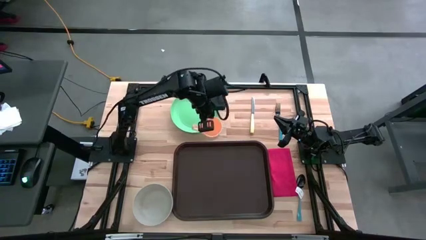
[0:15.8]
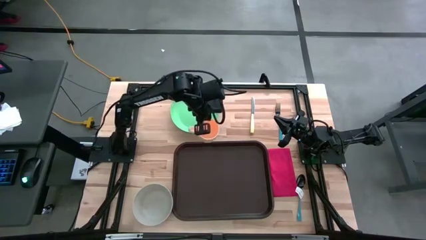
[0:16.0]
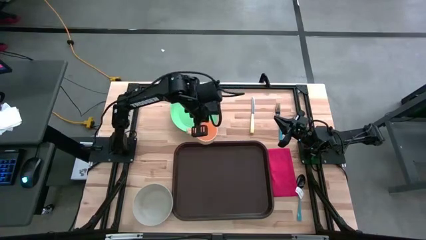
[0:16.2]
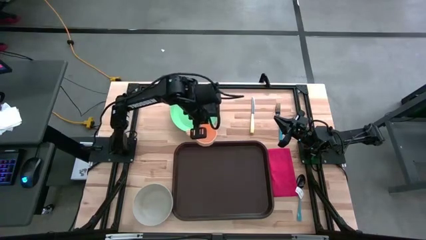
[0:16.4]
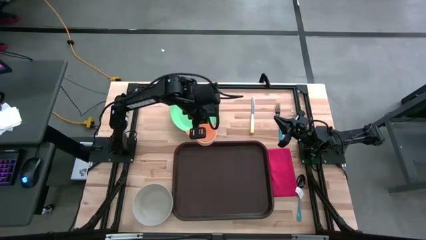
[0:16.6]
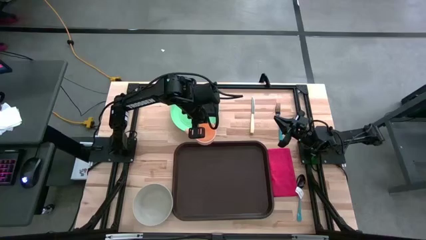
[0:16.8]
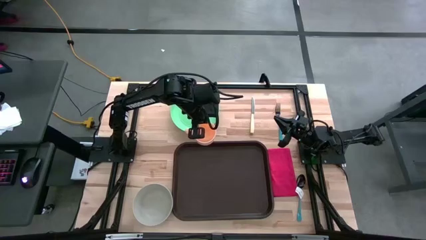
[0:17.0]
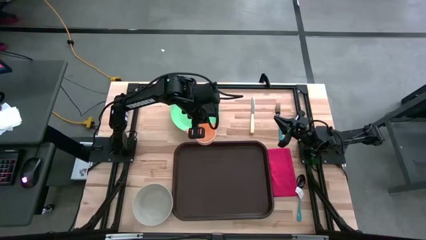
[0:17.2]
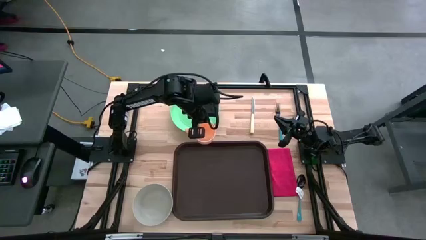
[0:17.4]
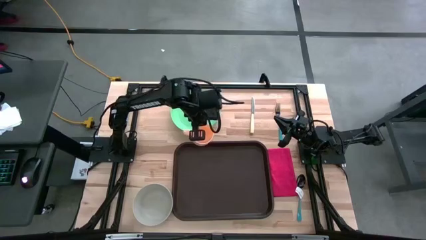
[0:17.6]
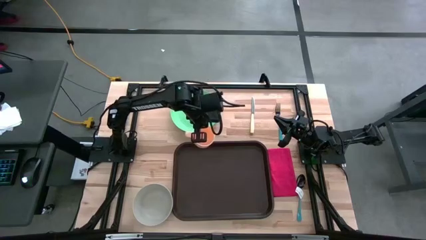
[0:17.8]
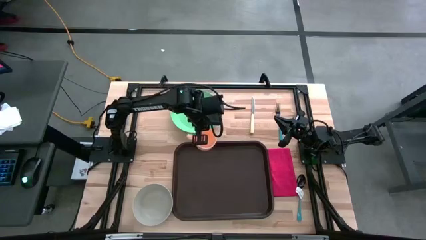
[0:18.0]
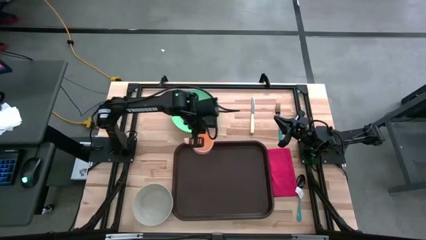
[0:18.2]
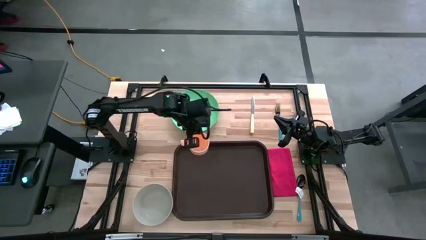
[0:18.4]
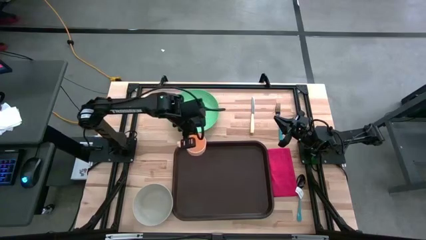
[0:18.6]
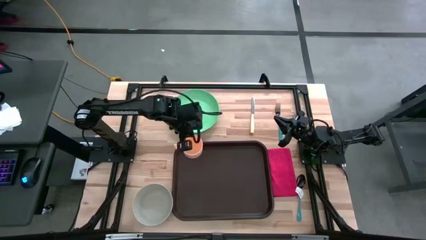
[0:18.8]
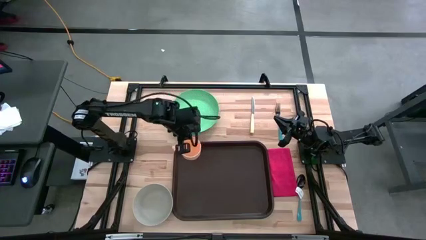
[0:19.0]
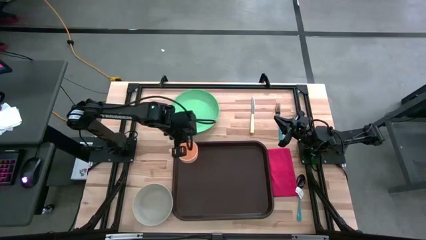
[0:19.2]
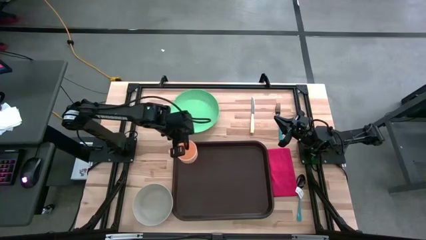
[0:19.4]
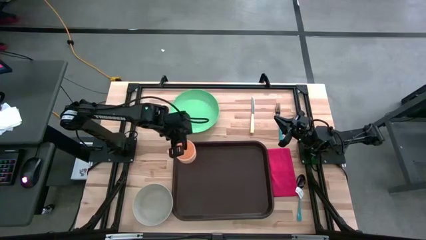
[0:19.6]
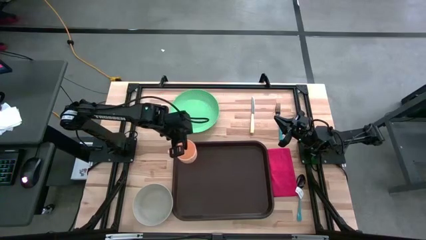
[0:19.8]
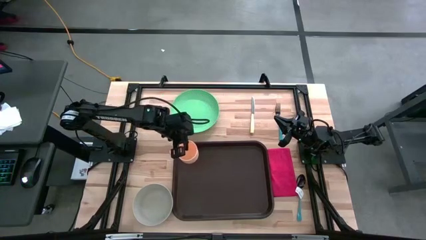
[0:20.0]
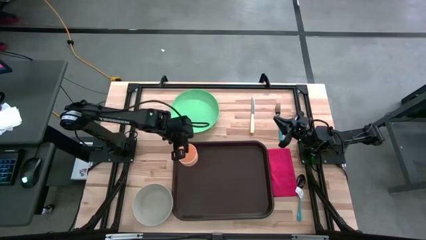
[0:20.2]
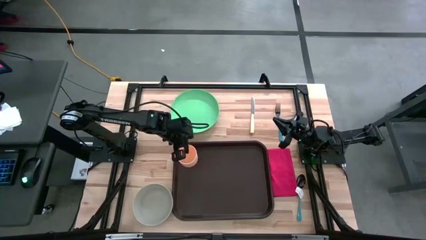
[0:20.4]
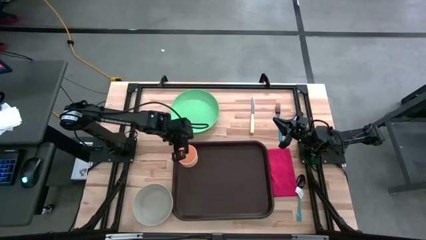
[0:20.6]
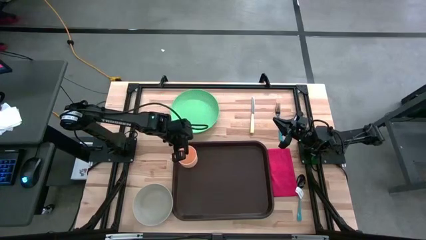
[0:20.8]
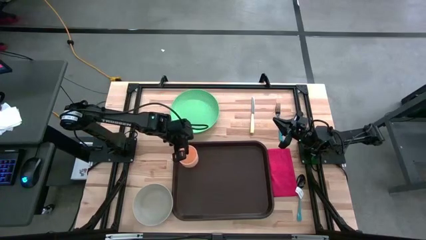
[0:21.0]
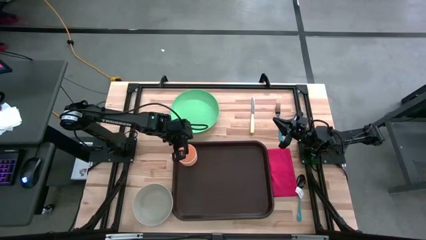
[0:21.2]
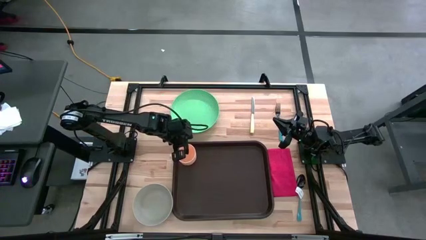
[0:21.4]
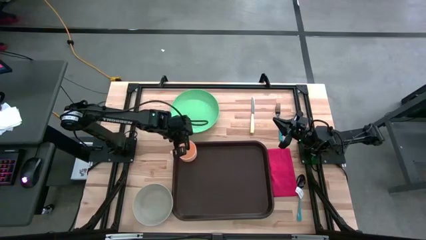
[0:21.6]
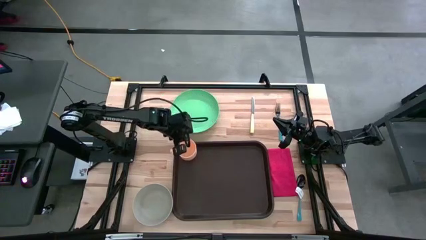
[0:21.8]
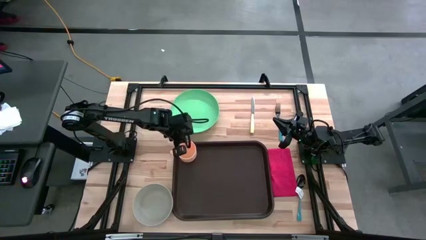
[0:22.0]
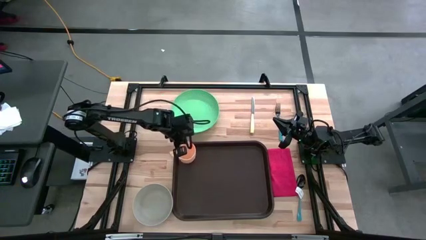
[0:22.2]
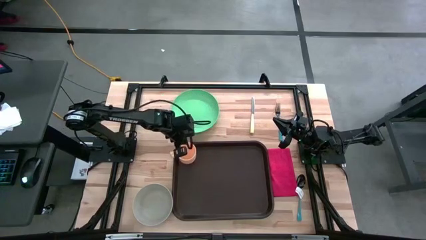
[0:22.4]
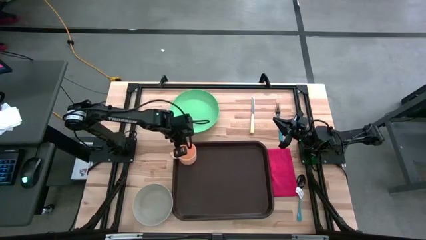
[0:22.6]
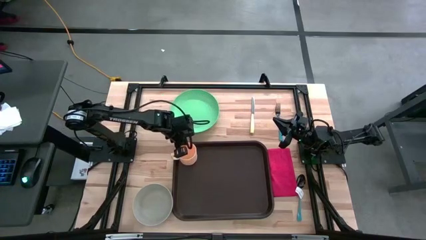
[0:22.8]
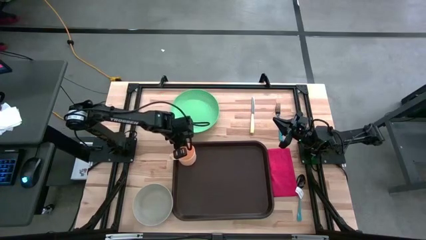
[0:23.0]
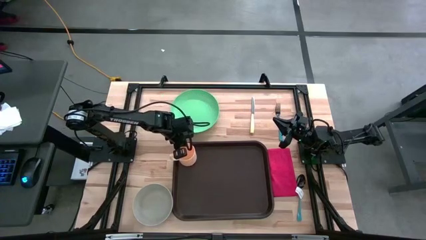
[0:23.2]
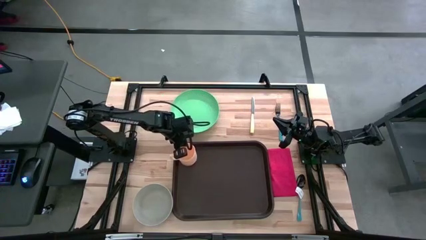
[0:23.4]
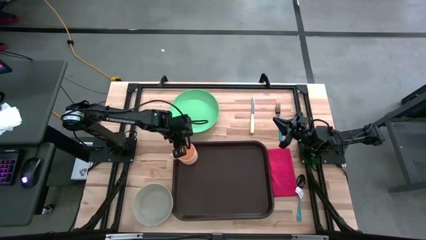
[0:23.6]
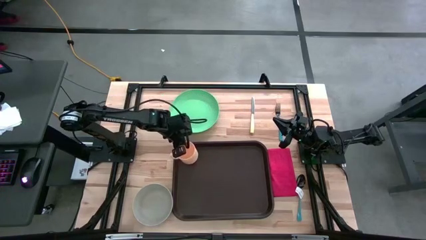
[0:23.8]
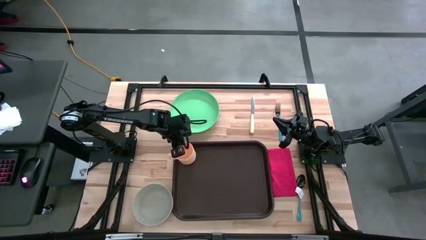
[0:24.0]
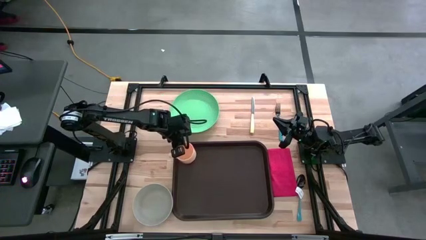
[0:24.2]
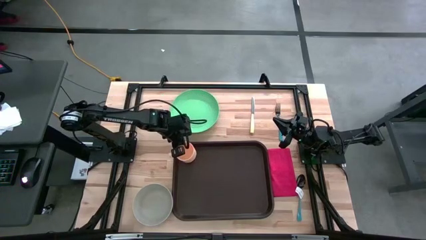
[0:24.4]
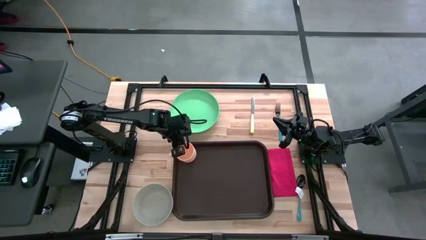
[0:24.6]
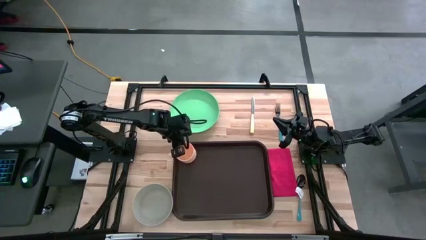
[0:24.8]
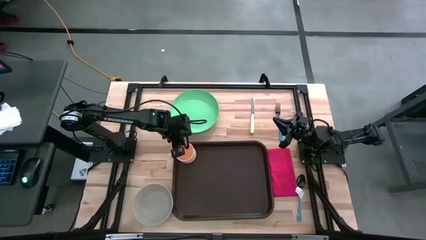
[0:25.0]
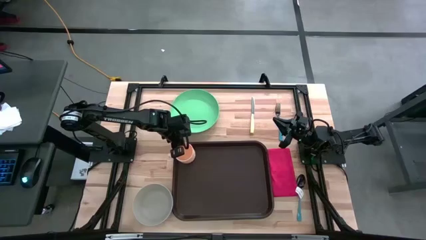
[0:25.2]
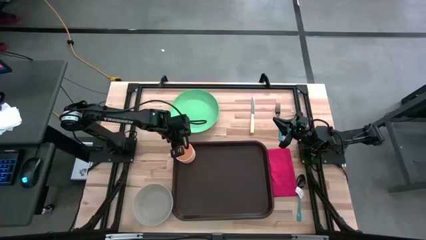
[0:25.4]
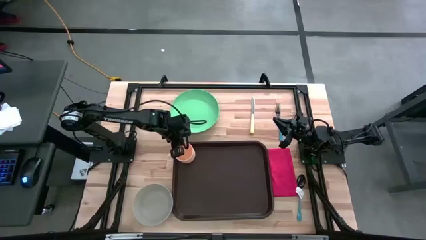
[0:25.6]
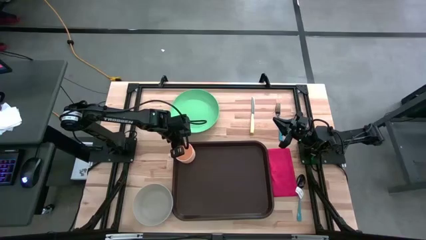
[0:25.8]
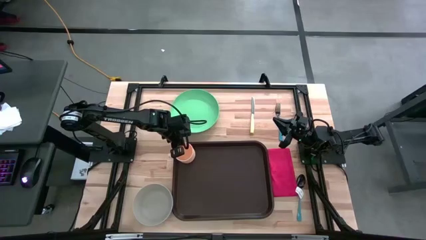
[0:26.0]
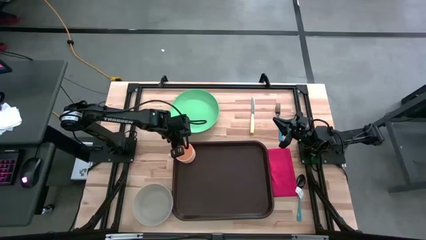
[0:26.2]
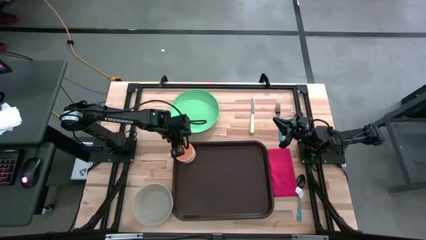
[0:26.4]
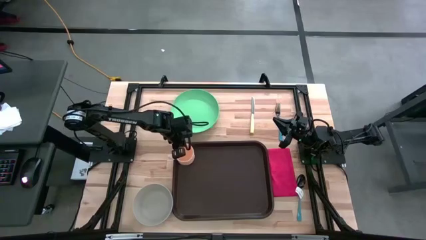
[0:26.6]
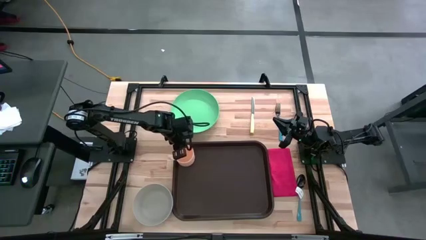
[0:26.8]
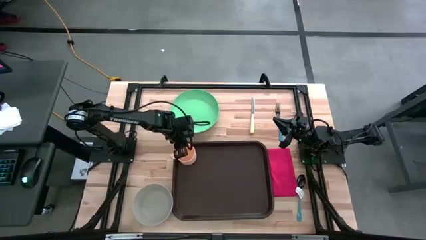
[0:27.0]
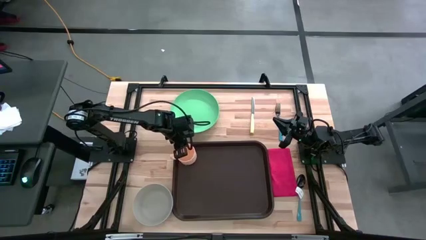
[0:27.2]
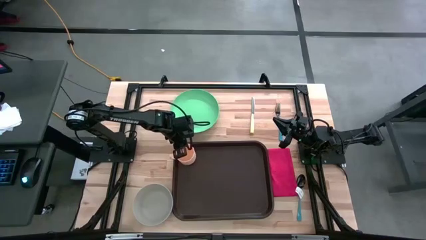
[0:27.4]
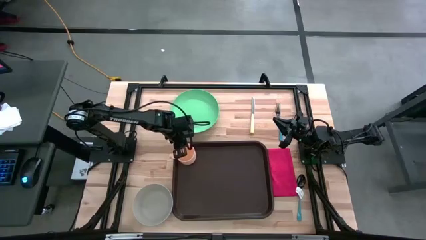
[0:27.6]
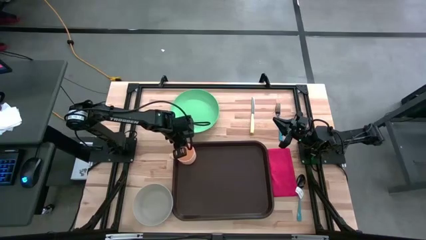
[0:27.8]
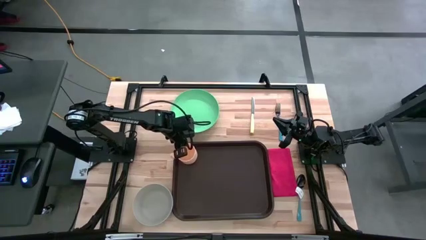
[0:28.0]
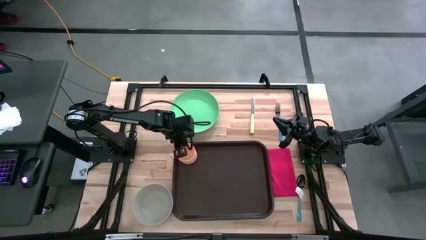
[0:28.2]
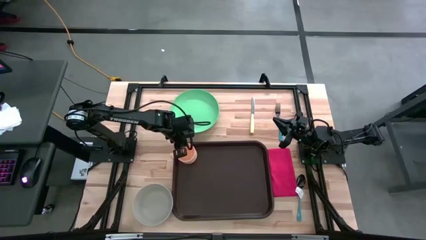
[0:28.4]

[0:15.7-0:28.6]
Task: Set up tray
Put the orange mug on the brown serving tray
